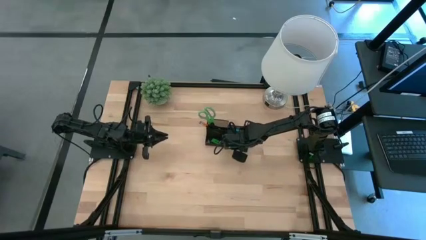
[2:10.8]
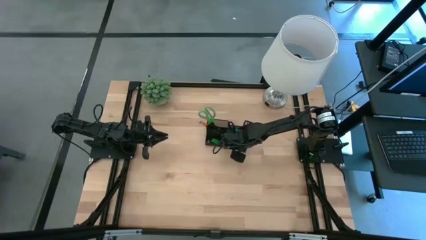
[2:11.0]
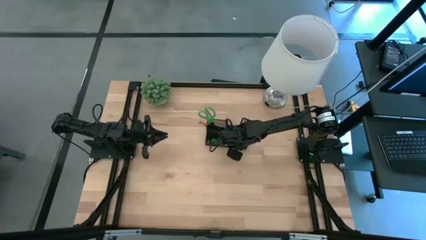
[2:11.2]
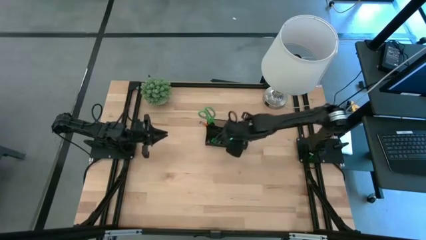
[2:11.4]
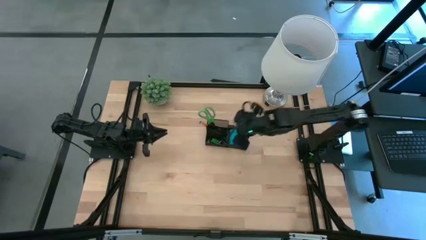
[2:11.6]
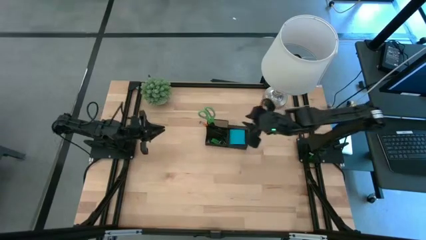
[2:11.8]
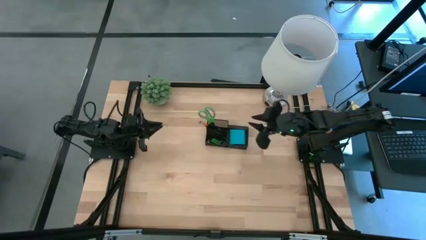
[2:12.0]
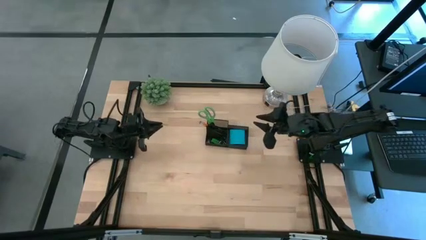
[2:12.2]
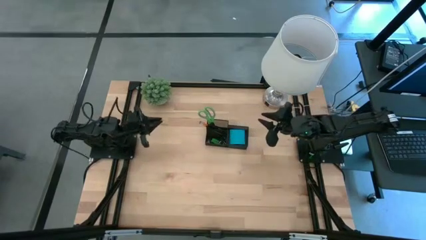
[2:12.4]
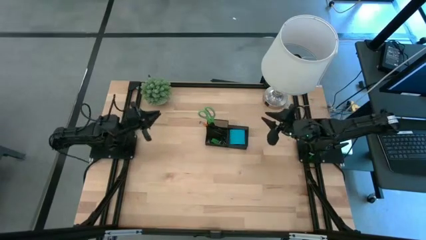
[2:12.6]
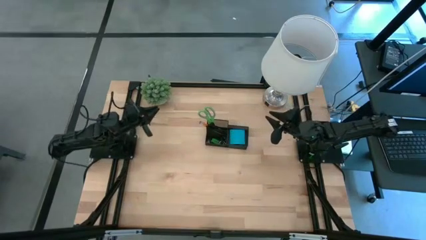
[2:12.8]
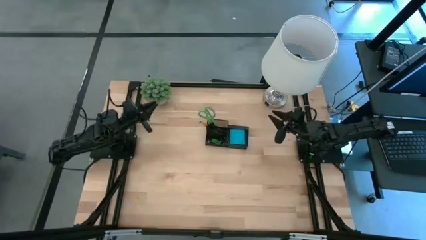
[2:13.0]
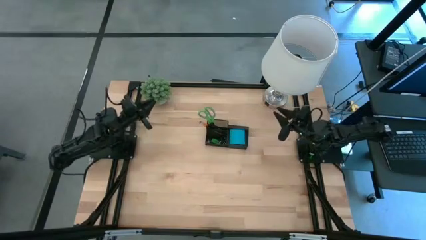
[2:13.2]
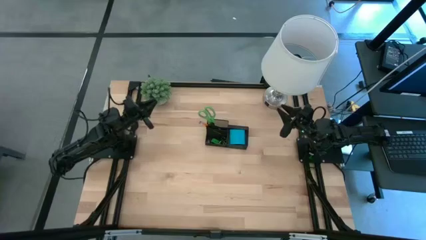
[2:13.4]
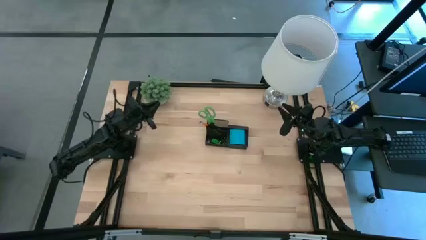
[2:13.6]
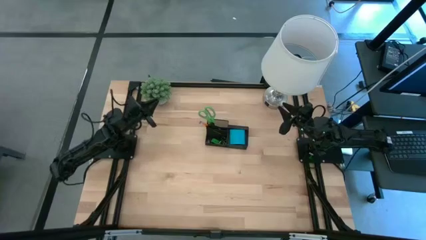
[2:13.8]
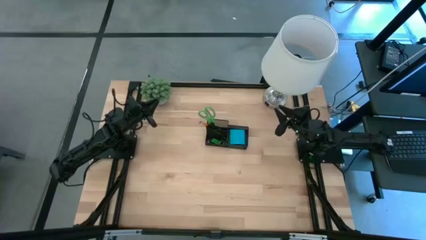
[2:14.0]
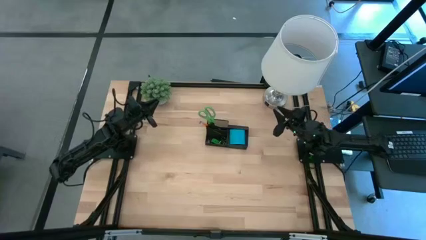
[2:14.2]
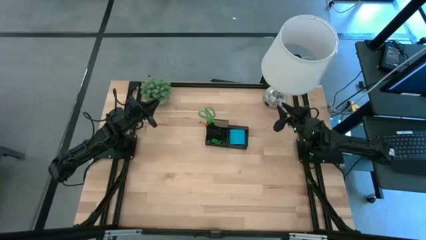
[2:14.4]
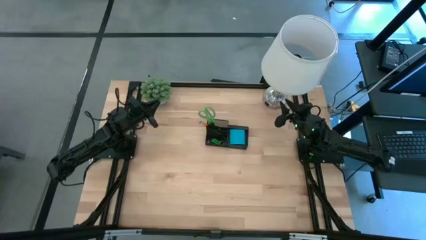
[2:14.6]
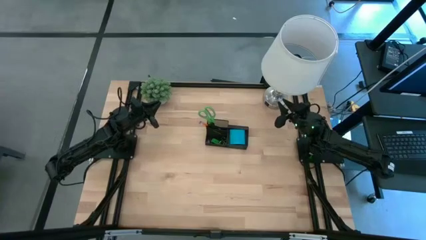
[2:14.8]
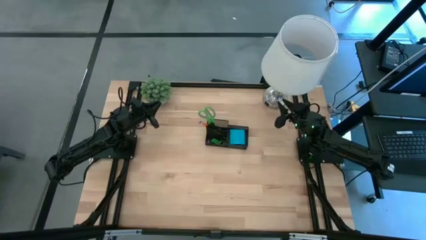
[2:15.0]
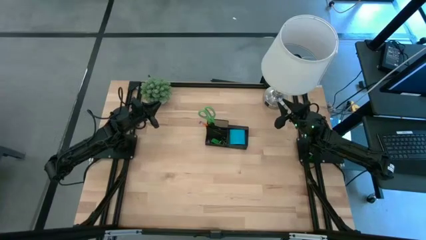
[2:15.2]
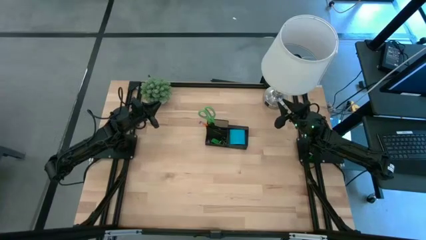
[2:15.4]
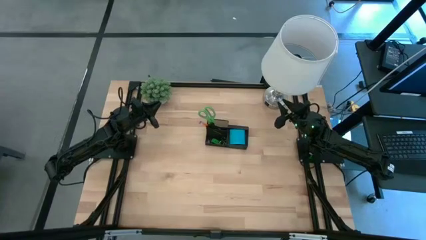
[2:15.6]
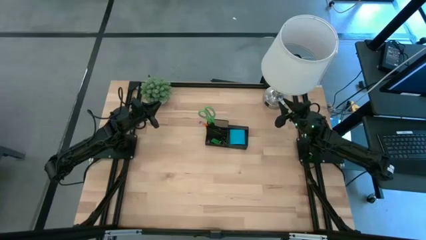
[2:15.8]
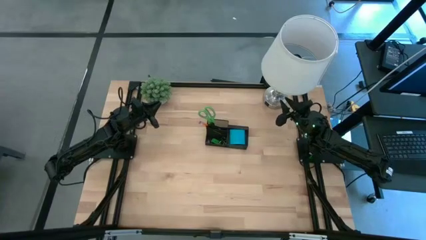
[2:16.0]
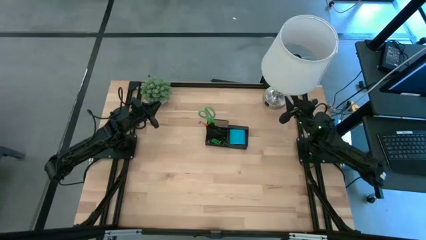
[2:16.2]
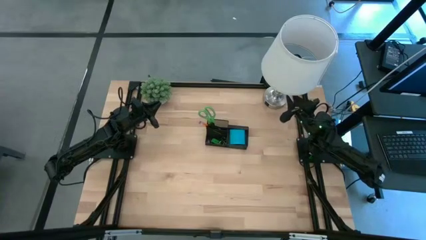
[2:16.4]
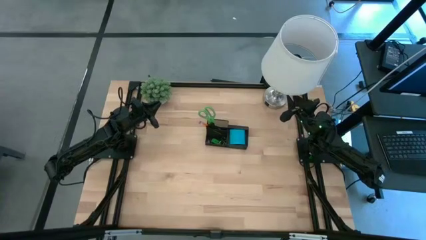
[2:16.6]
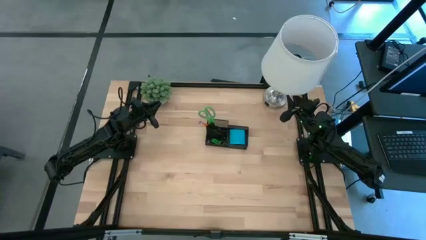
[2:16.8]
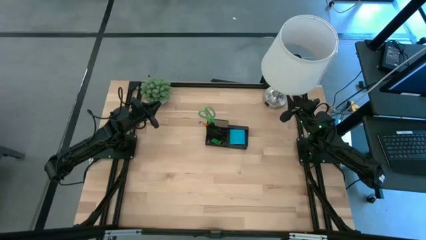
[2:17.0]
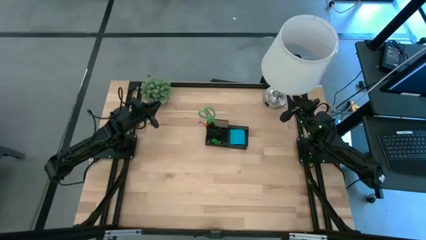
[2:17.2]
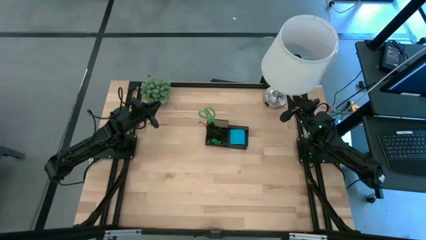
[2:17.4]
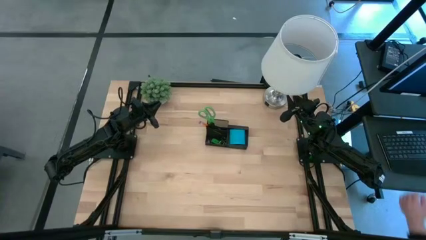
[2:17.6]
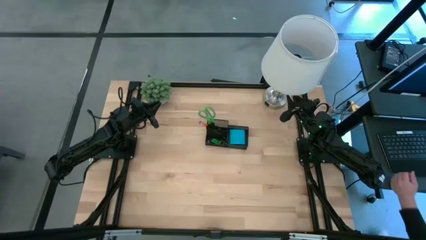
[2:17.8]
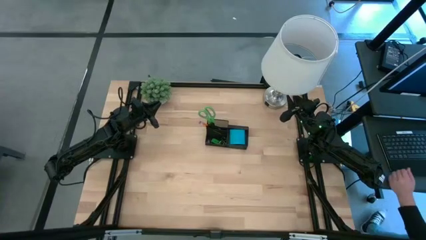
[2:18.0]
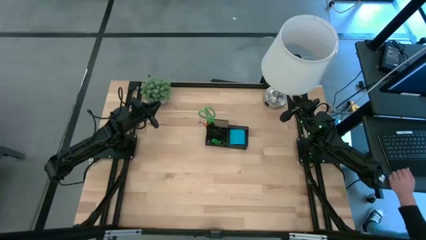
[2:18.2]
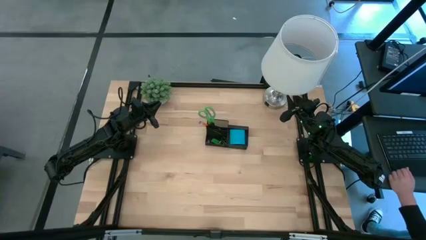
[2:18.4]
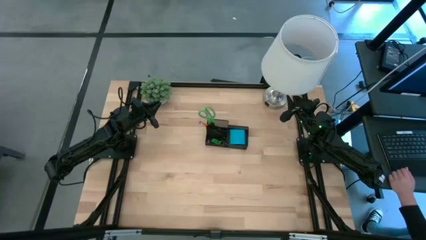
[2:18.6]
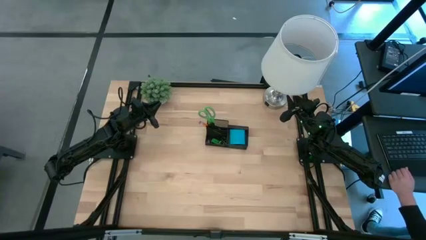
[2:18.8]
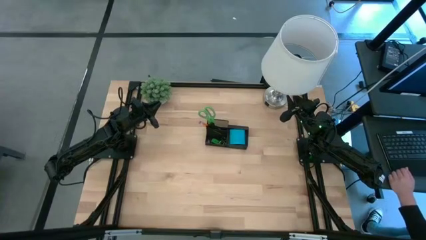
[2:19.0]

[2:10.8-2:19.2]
Task: Pick and place office supplies into organizer
Return to Home Position

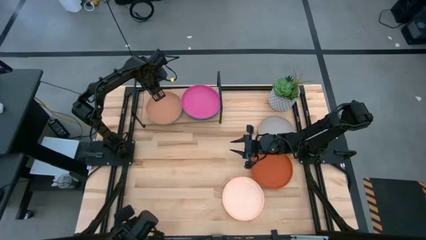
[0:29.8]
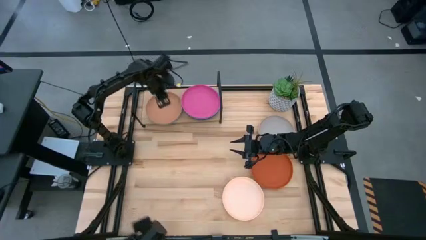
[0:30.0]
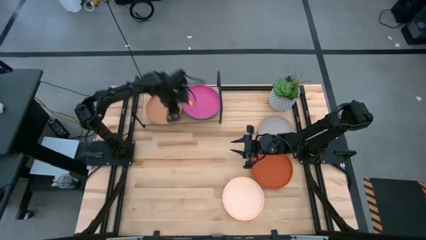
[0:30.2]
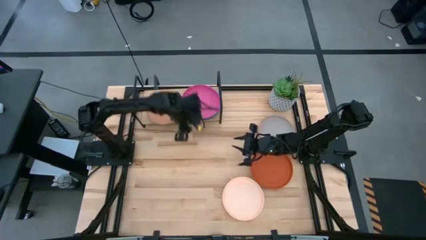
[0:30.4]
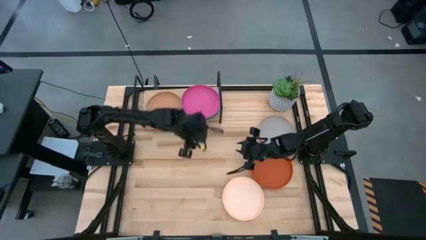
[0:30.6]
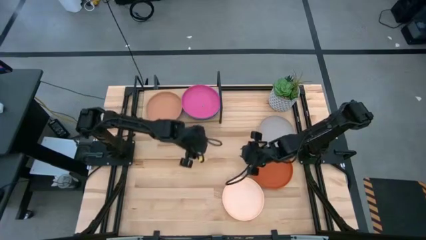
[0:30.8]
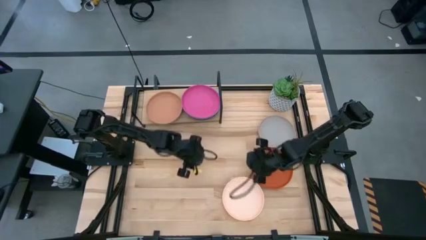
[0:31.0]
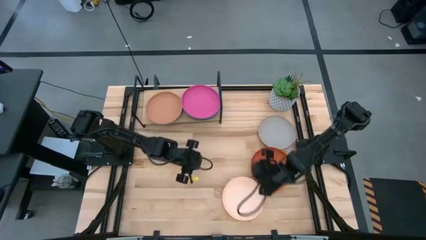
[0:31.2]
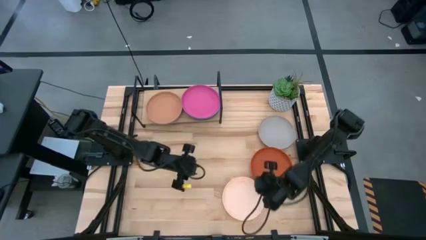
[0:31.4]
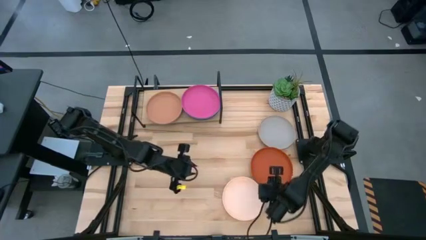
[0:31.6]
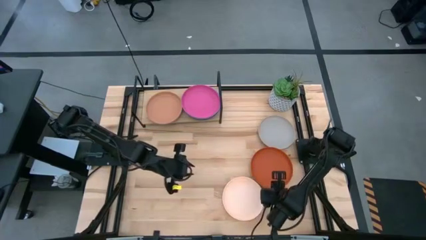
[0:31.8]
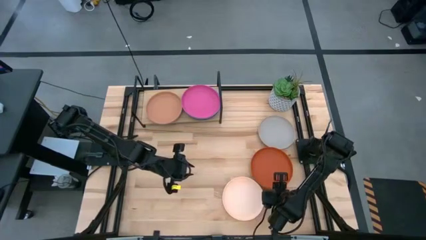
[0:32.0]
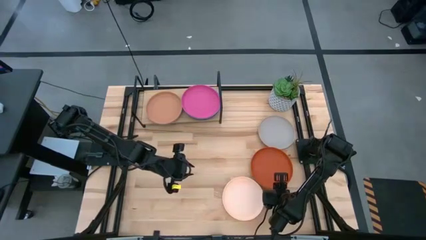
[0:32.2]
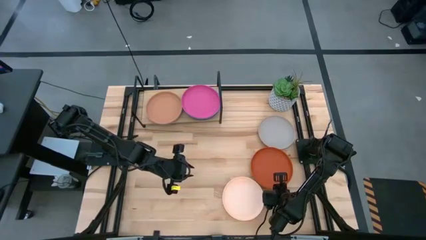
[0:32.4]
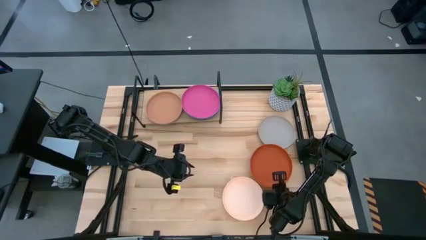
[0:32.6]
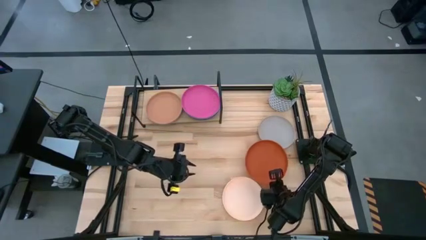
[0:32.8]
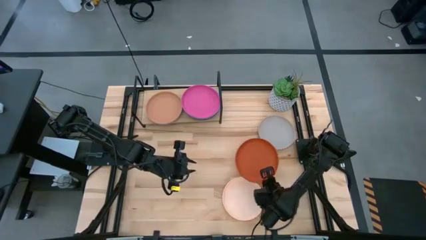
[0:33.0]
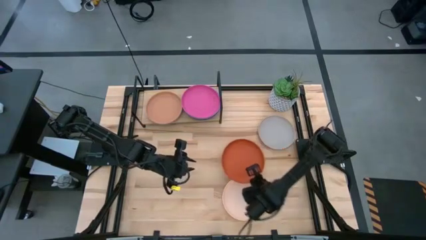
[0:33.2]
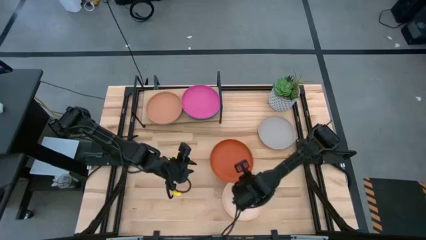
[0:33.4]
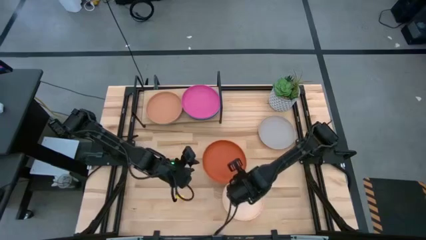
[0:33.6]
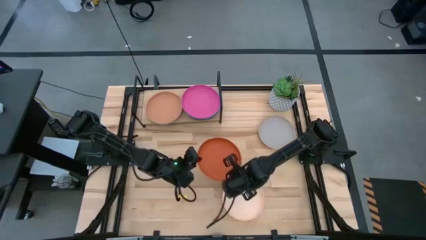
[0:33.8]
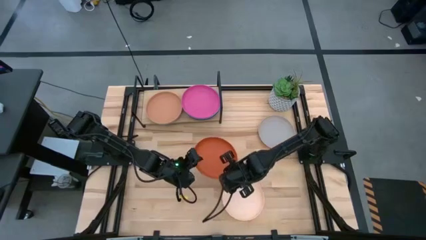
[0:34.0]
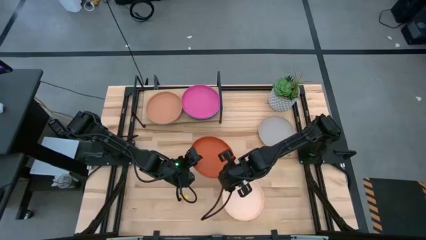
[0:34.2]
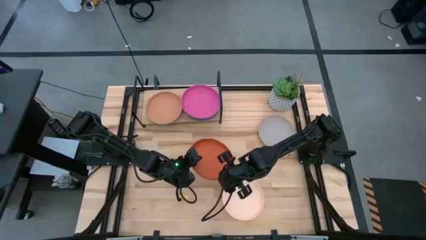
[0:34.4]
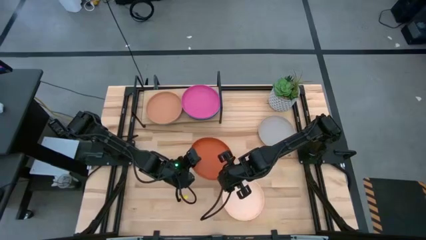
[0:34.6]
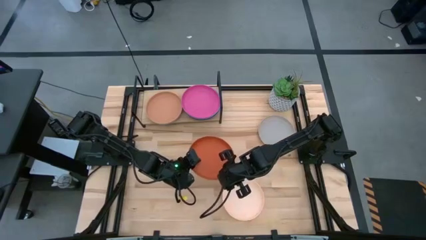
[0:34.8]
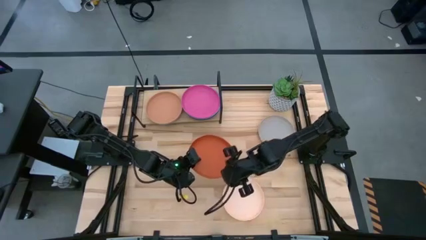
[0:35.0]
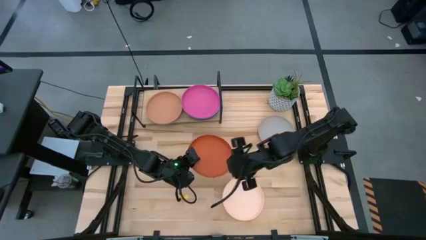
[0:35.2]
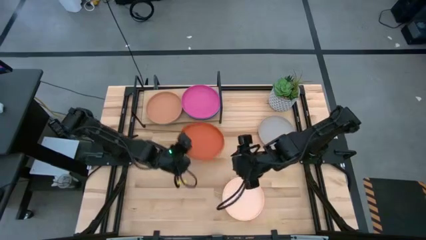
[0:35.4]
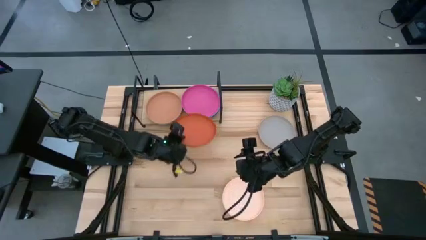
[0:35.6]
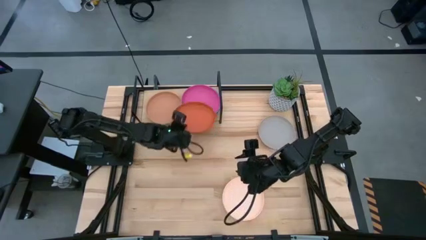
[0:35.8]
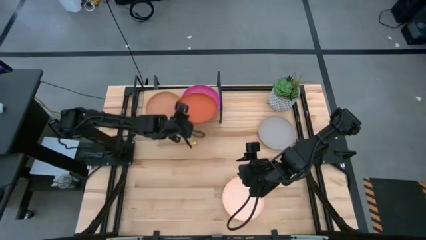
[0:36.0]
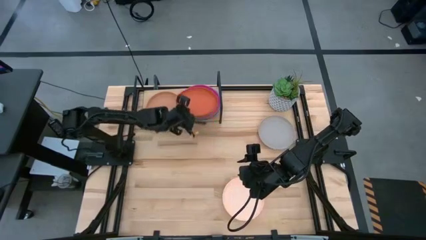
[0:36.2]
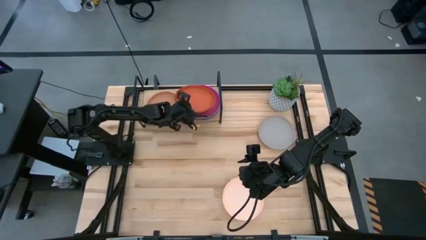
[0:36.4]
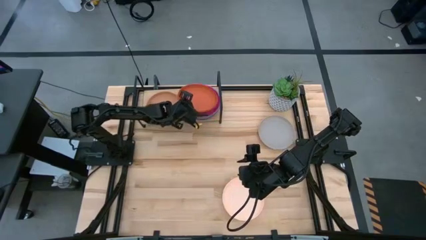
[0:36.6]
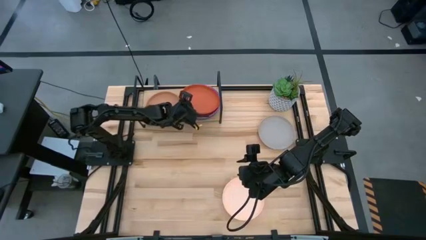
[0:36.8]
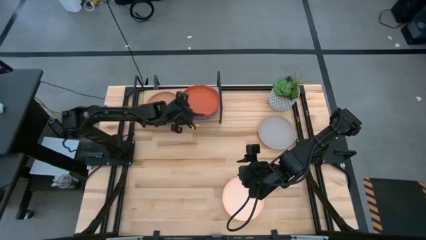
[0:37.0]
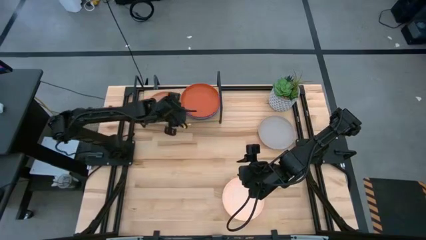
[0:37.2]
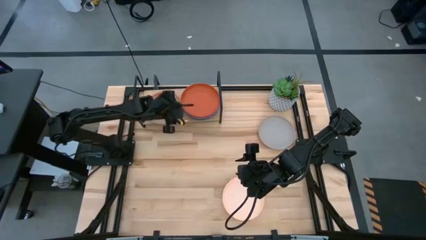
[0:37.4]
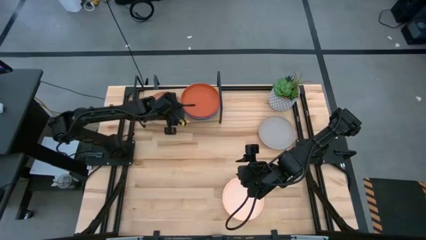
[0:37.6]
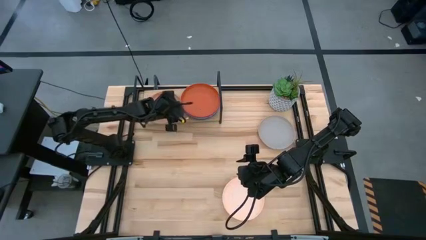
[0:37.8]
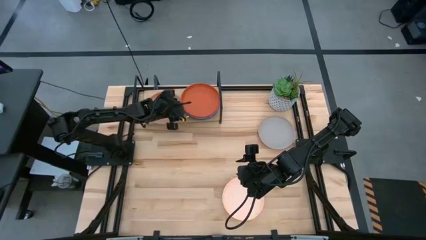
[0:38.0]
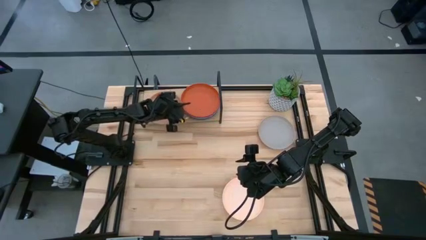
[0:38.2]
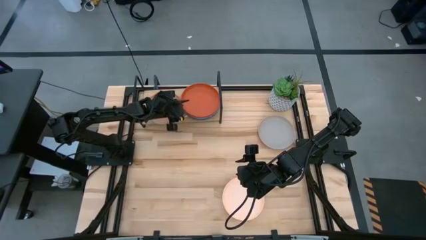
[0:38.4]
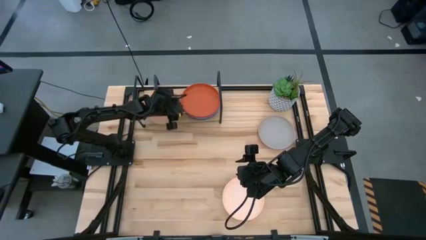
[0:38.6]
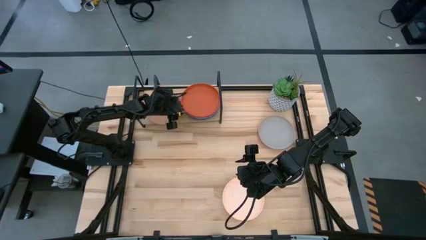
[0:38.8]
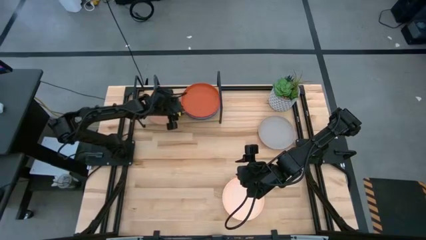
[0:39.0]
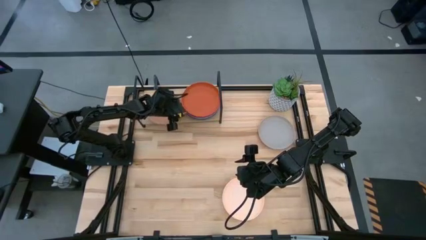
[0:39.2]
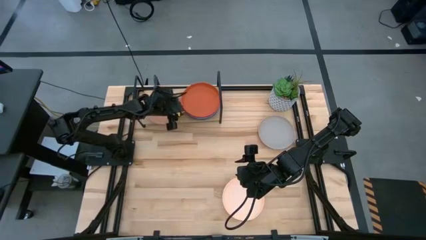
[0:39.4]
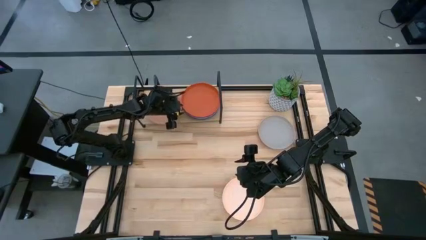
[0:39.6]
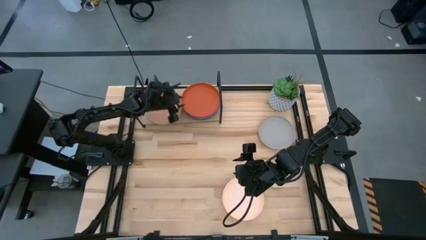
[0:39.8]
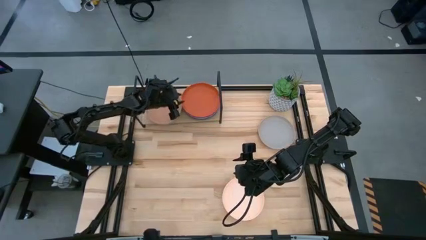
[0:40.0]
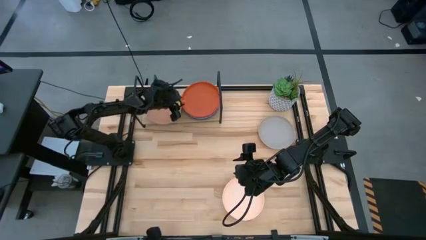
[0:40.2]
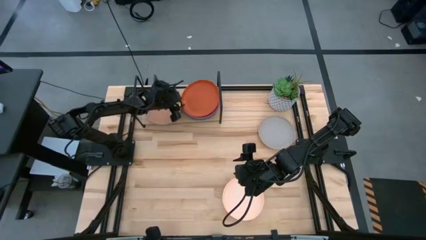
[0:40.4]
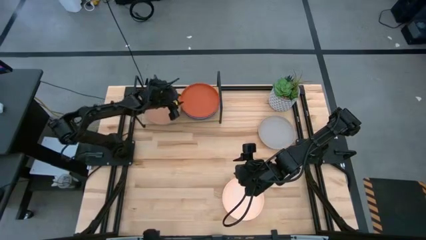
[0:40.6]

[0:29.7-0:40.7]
Task: Place and stack plates onto a shelf
Stack the orange plate on top of the pink plate on the shelf
